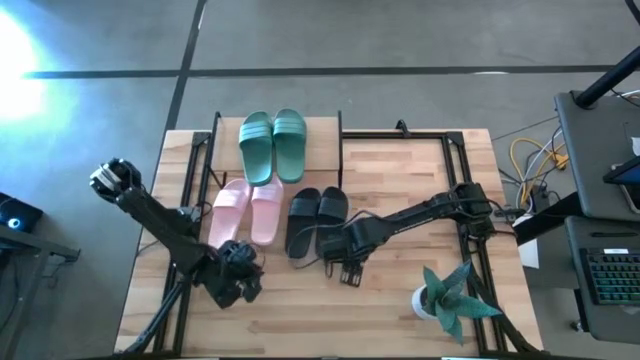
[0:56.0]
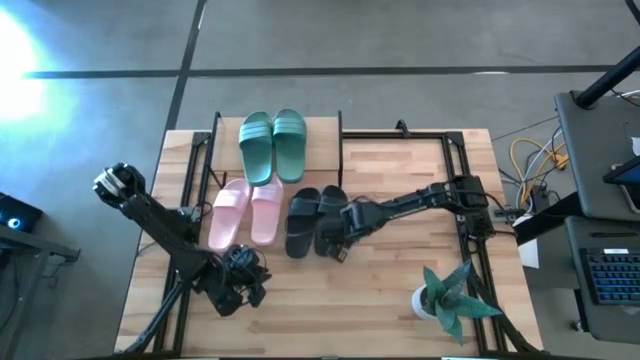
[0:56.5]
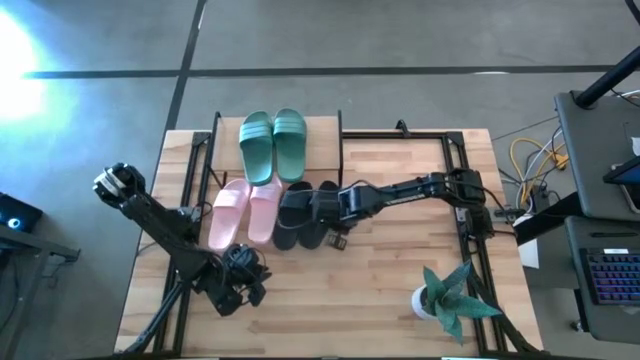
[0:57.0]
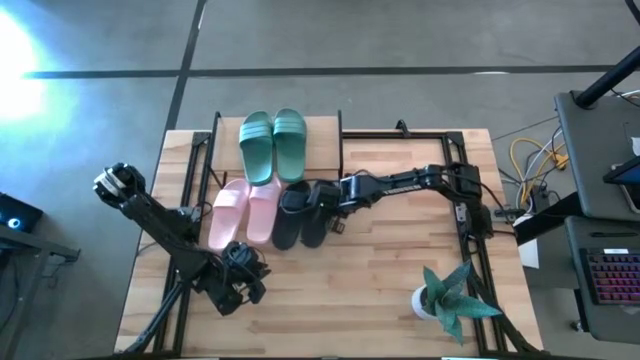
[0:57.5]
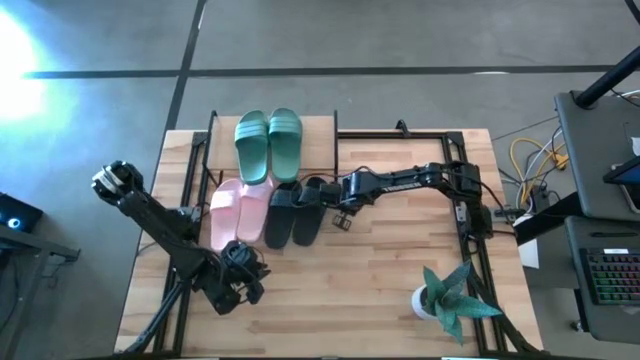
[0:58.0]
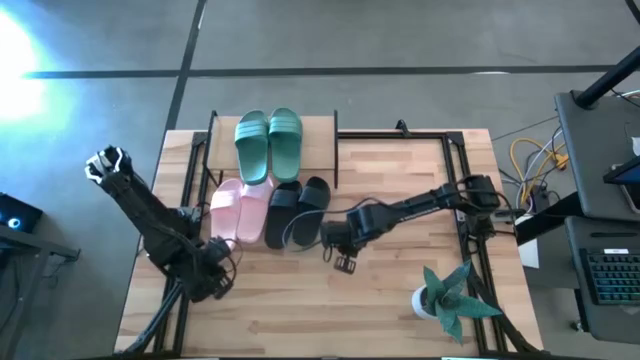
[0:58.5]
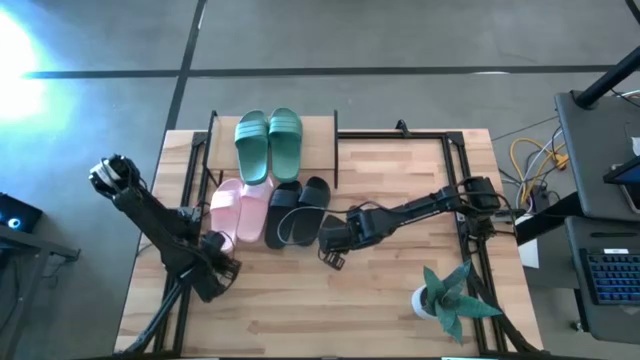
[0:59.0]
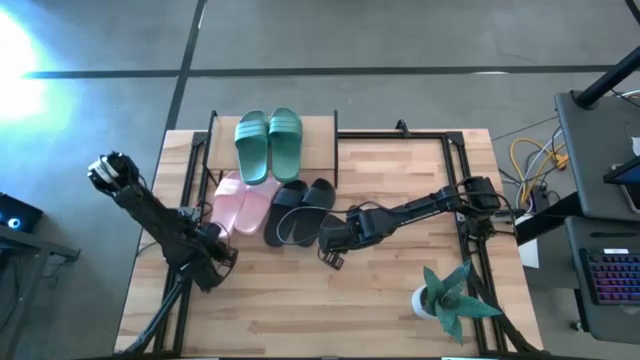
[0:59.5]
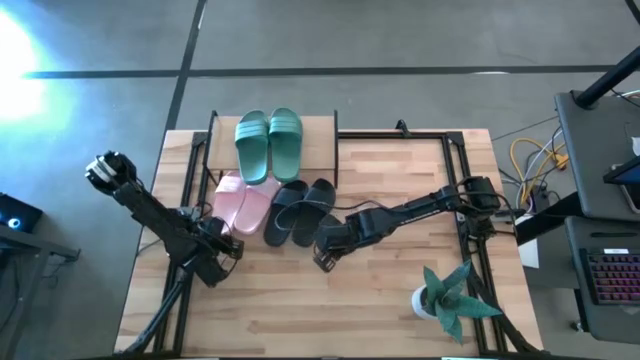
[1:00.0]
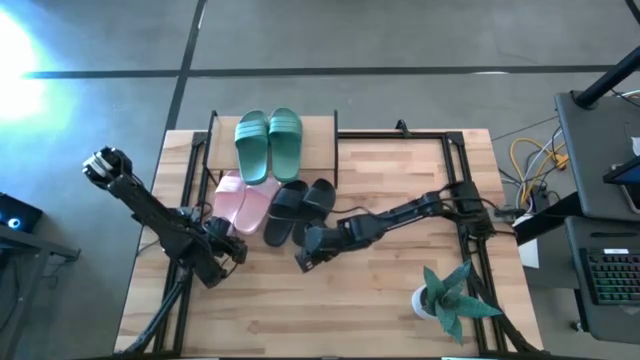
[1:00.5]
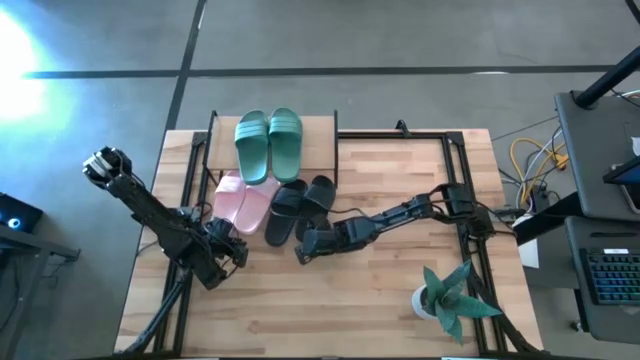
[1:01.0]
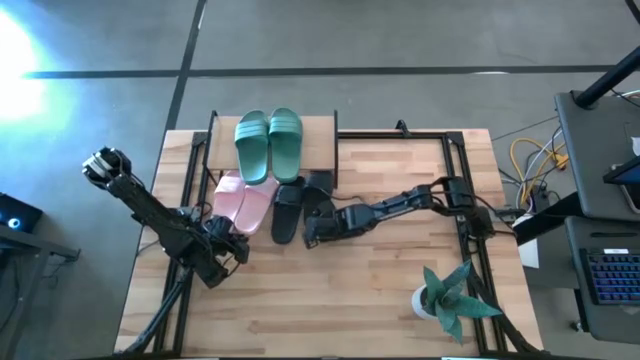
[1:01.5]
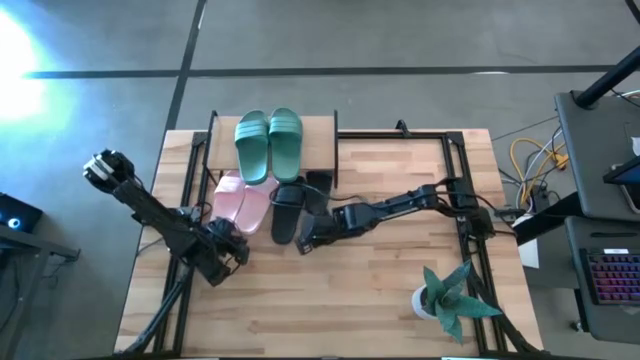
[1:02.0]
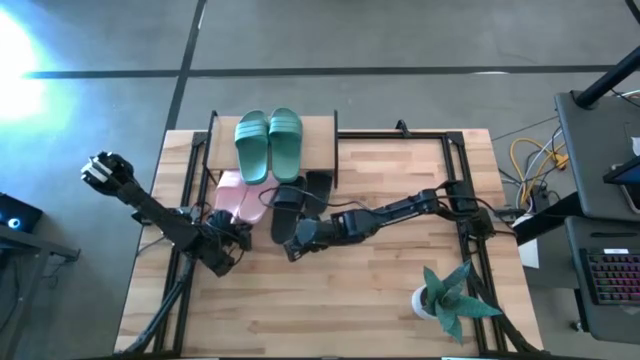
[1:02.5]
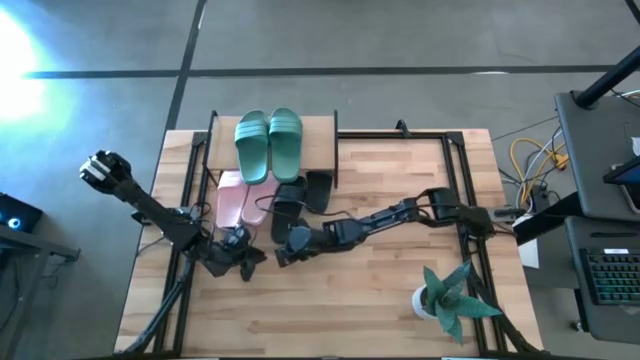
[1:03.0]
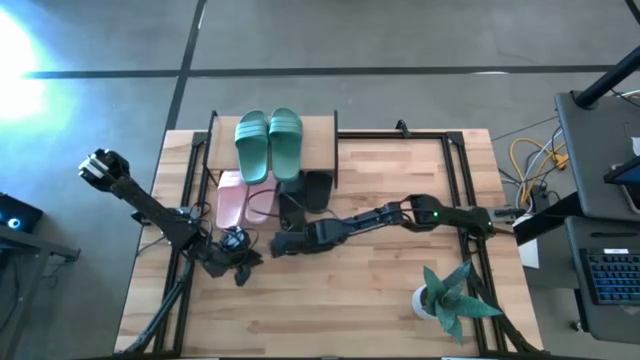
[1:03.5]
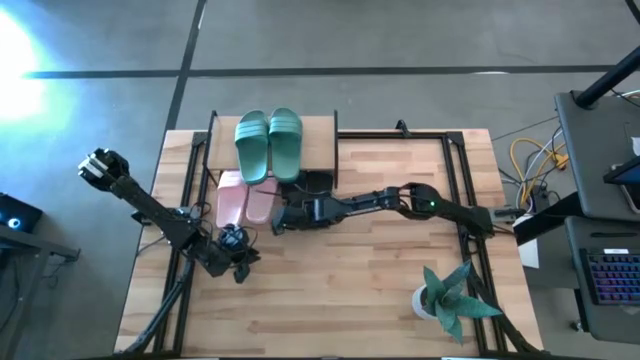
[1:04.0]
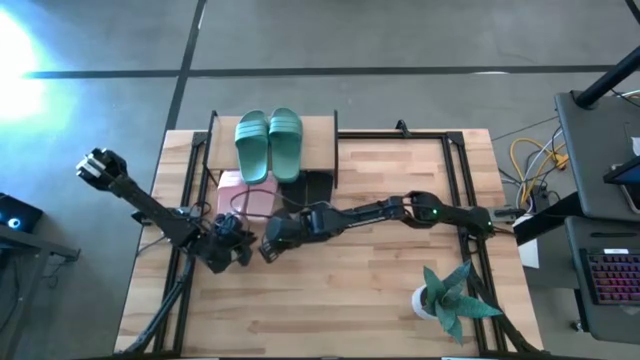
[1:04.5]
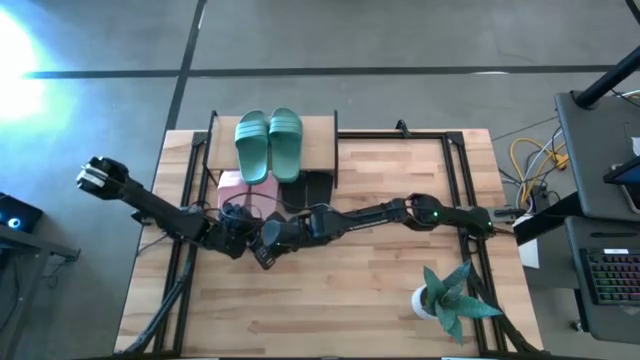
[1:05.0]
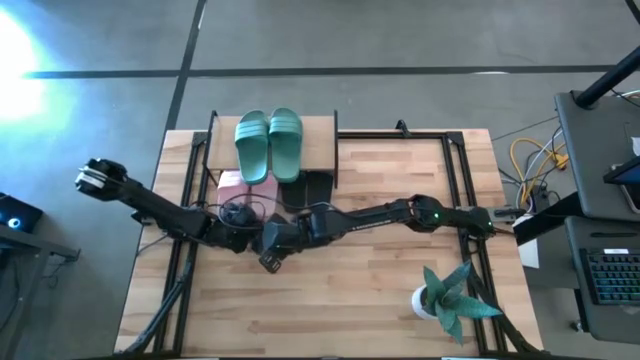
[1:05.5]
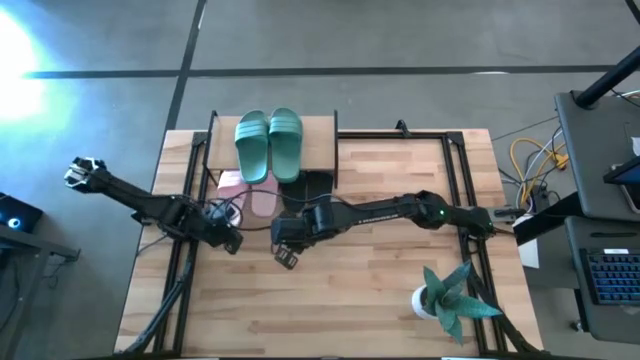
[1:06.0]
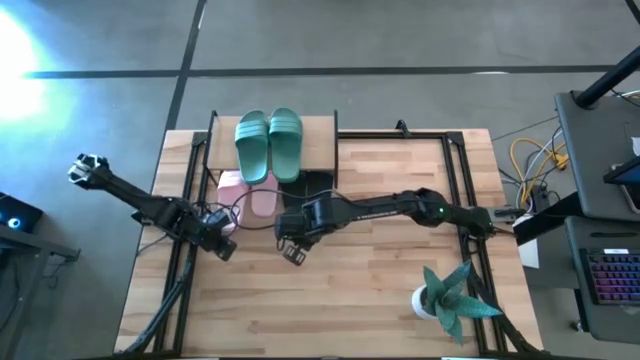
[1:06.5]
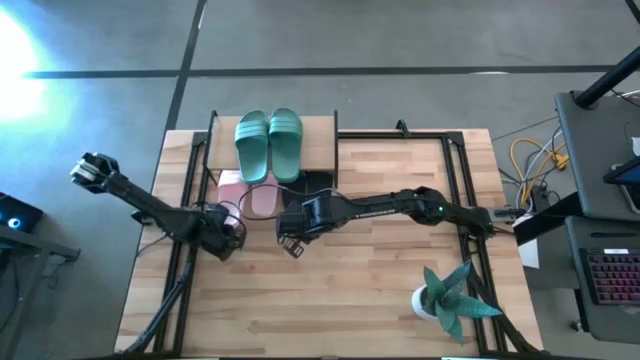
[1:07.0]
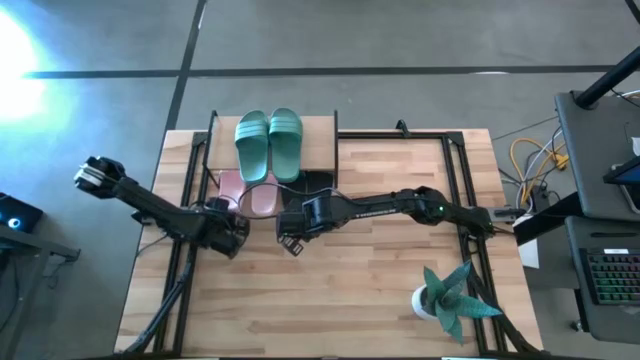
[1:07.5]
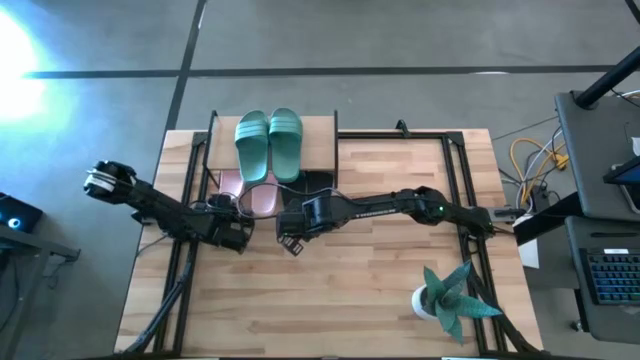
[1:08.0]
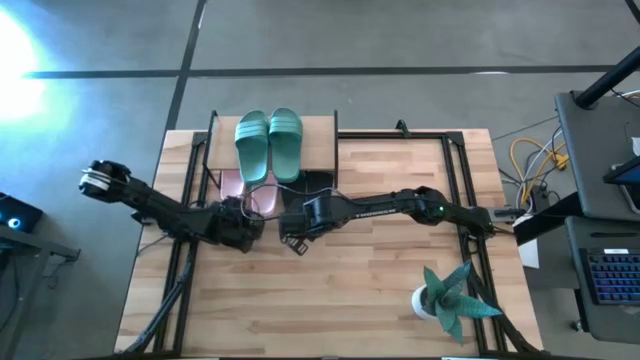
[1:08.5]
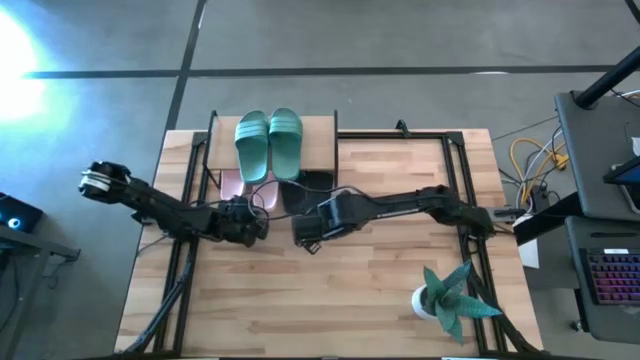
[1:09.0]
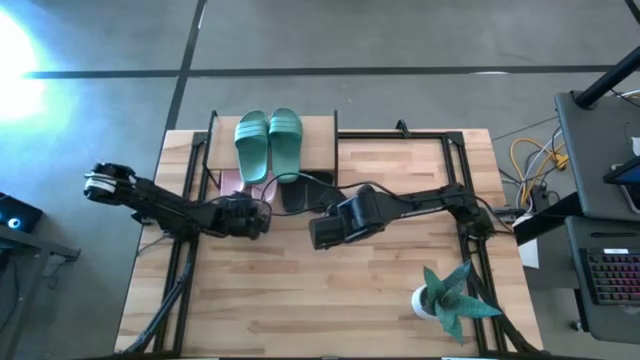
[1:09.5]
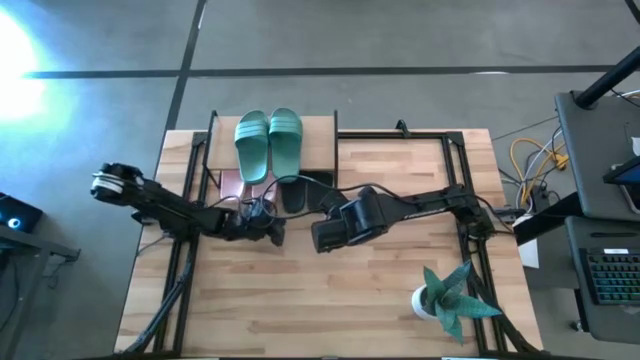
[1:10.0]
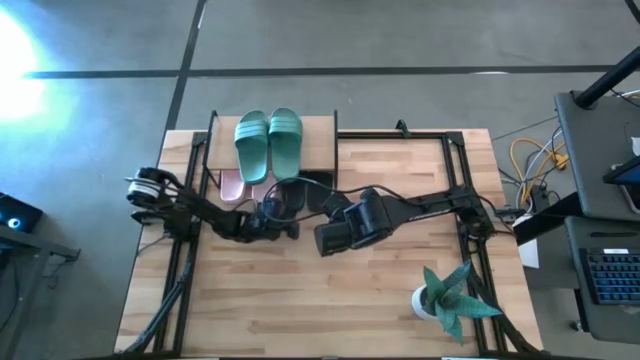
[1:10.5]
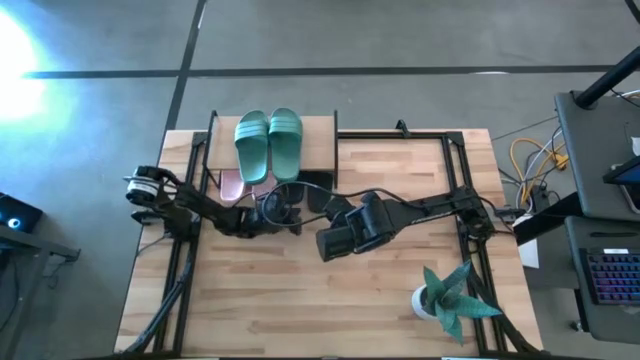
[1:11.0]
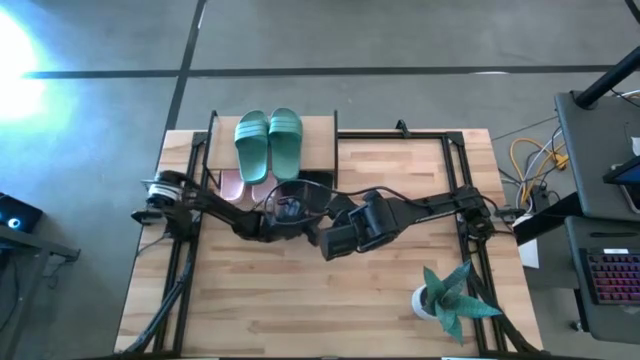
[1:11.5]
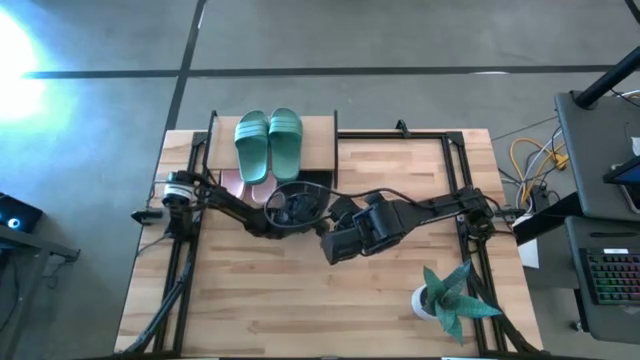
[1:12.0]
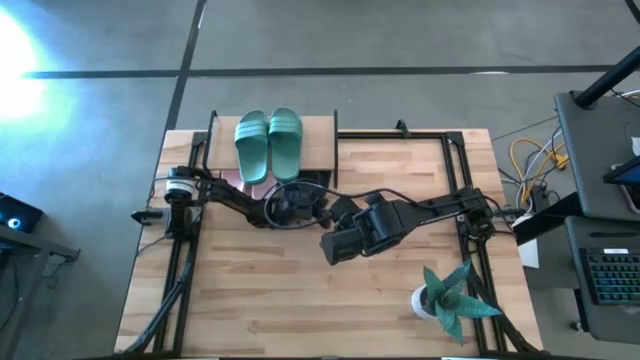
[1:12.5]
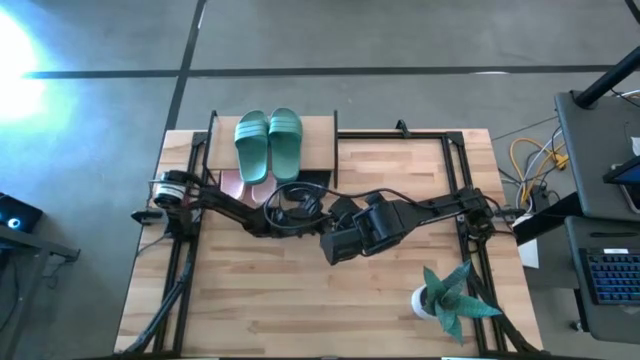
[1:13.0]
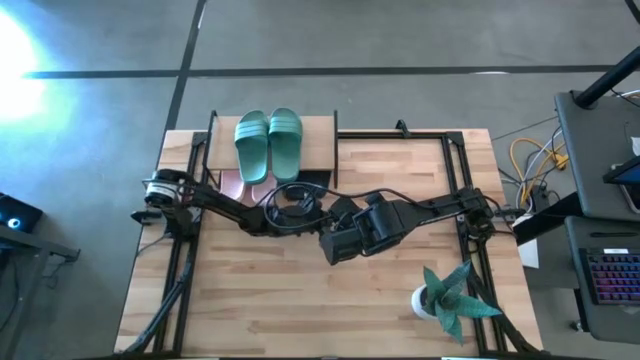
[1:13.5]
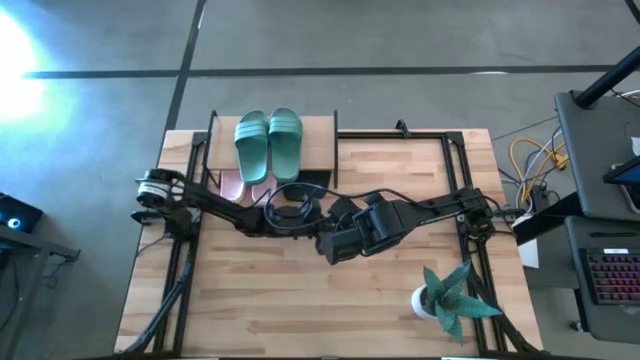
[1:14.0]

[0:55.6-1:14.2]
Task: Pick and place slides into the shelf
Adjust the slides under the shelf

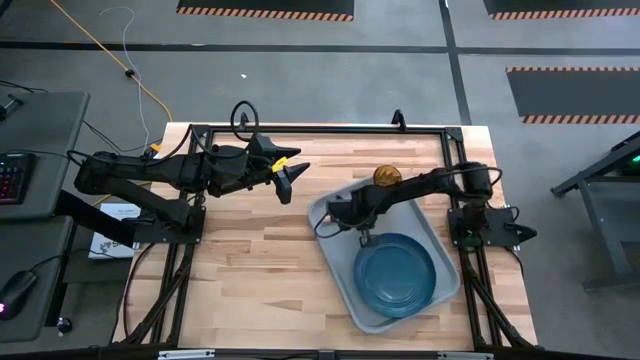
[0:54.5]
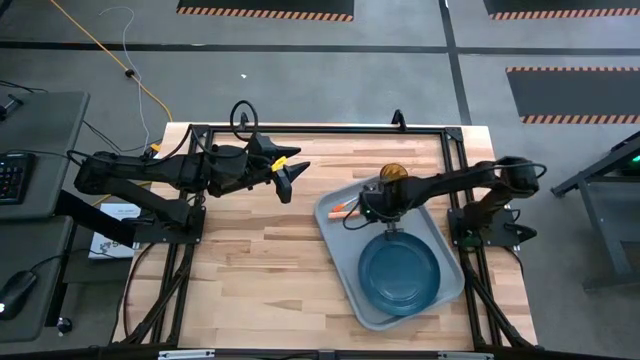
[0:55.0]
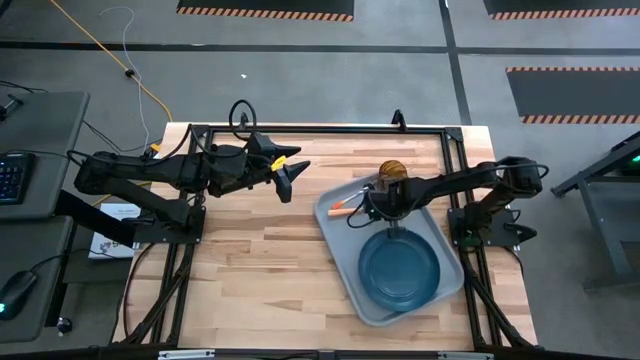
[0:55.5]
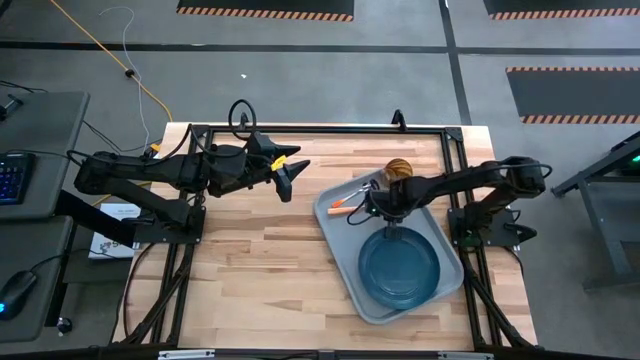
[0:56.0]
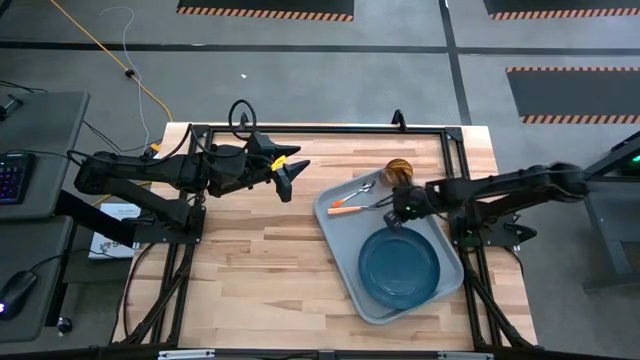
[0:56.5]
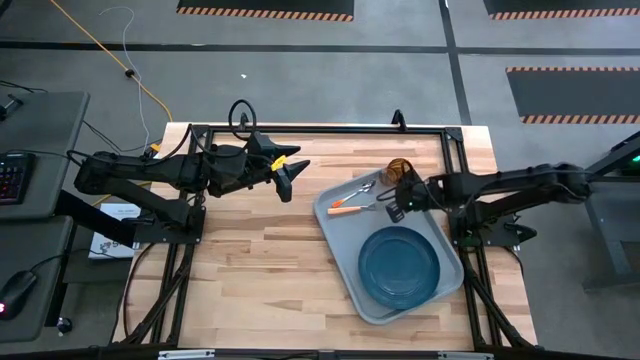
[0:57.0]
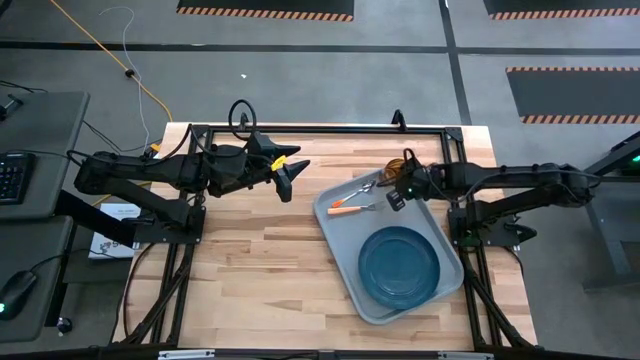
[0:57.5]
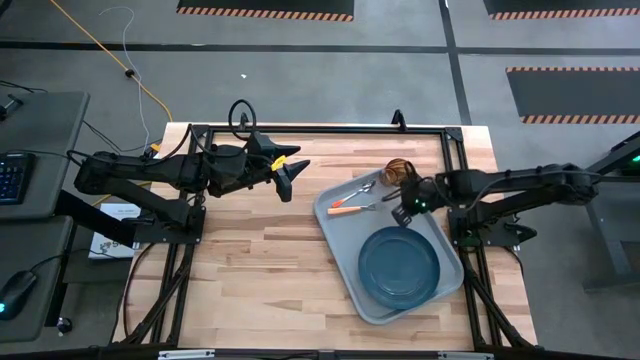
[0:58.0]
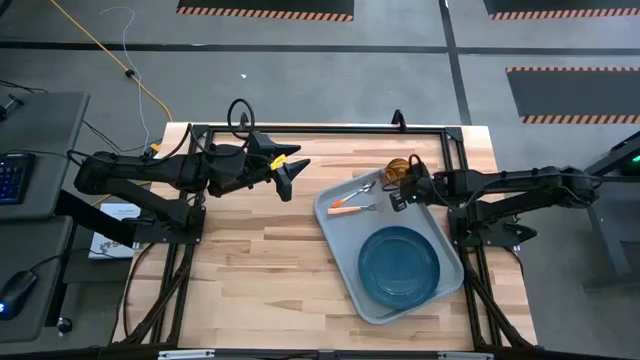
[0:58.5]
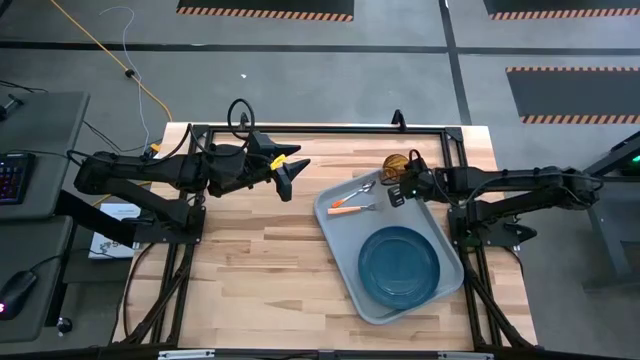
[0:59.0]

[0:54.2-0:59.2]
Task: Pick and place plate/cup/fork/spoon on tray
Adjust the brown glass on the gray serving tray
